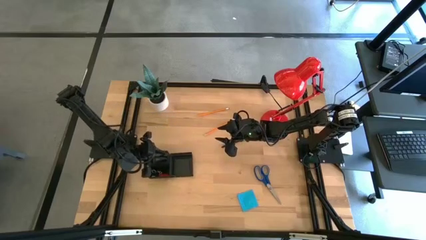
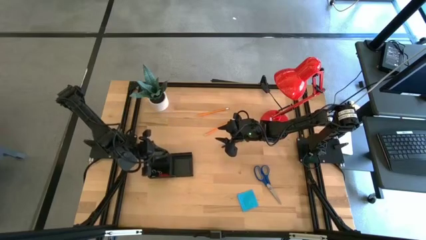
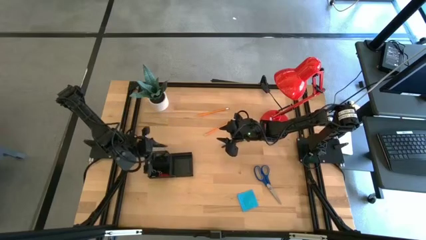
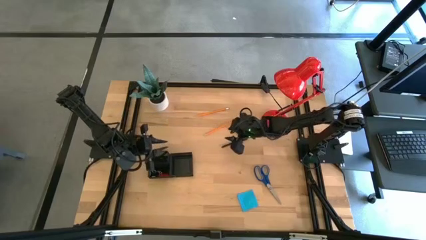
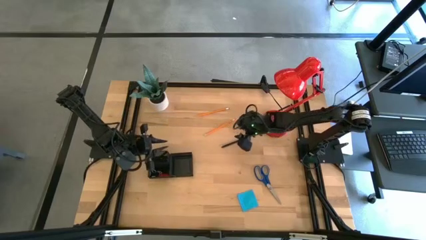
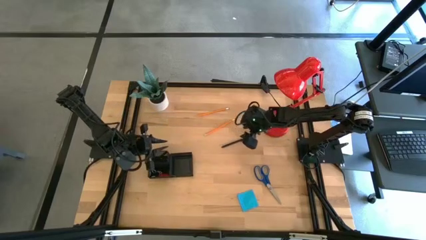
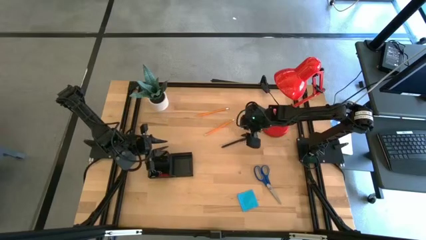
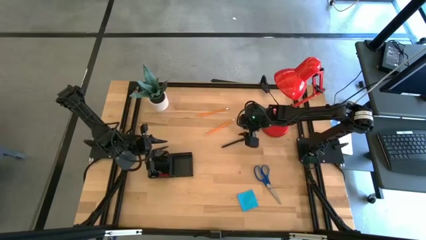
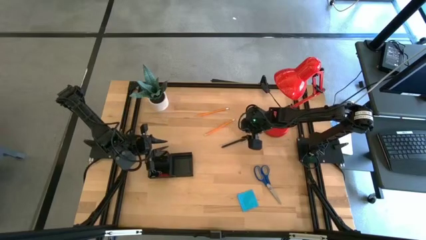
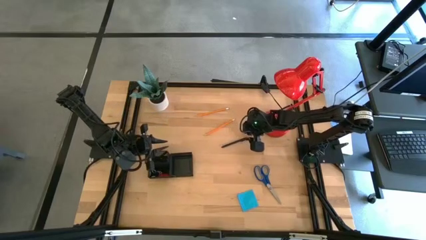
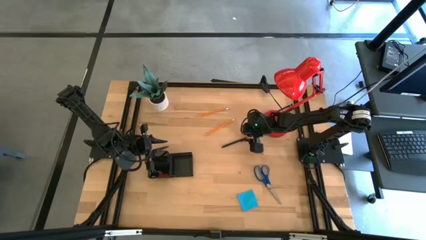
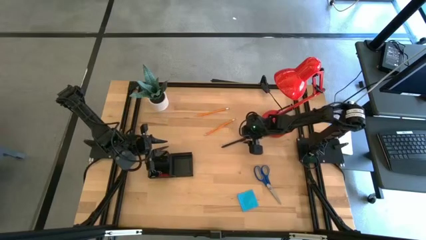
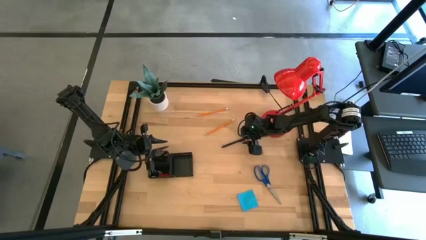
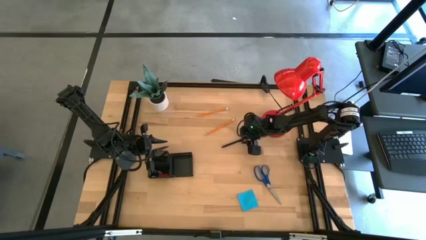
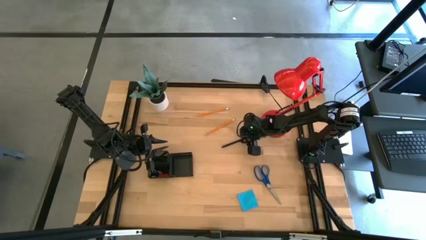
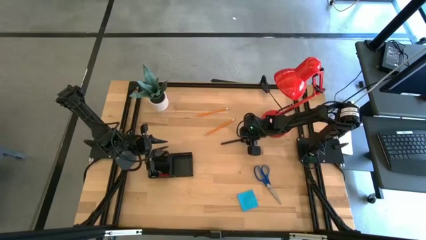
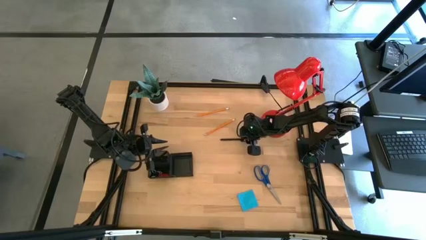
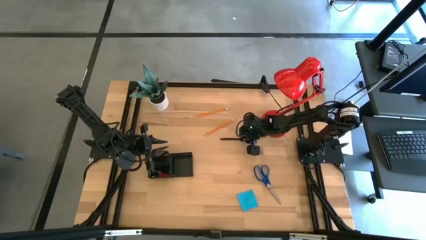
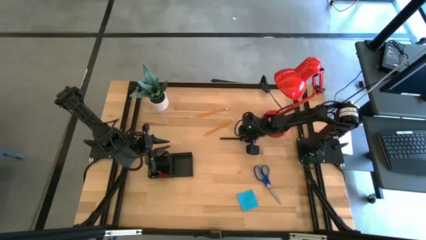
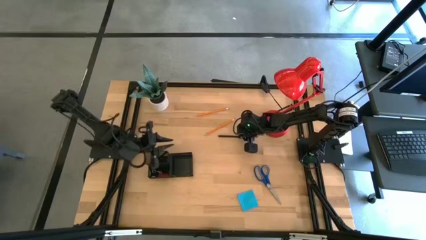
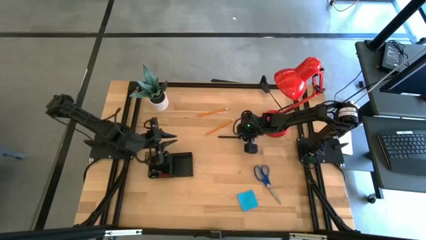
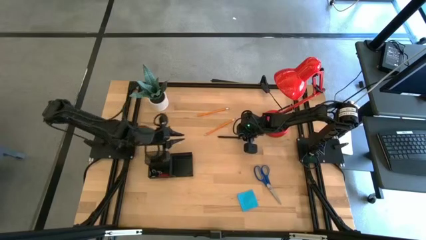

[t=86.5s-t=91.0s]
Task: Pick and place office supplies into organizer
Put the black pen into the back left compartment of the desk organizer

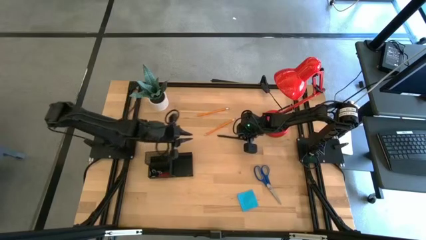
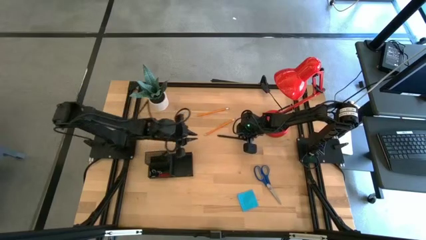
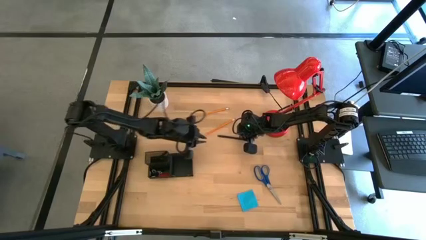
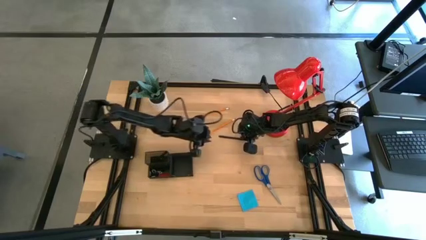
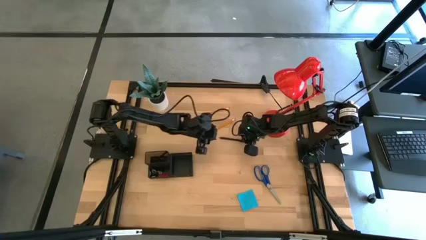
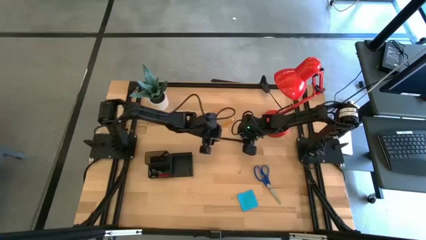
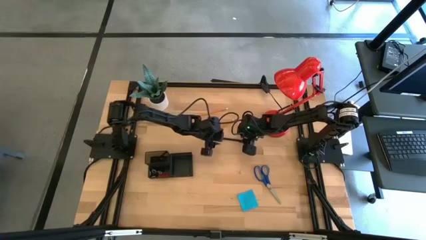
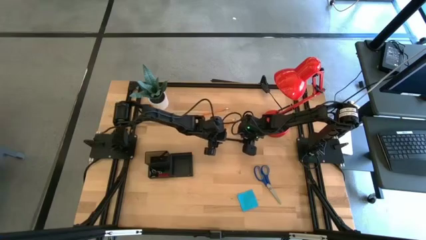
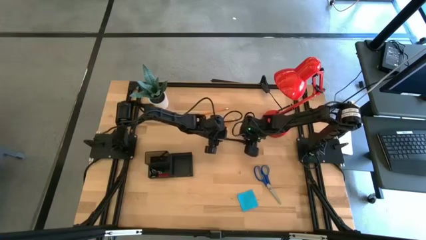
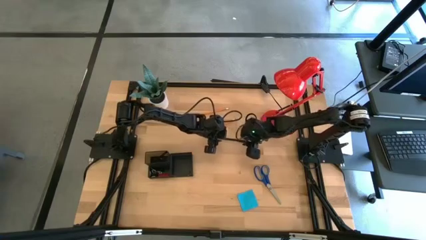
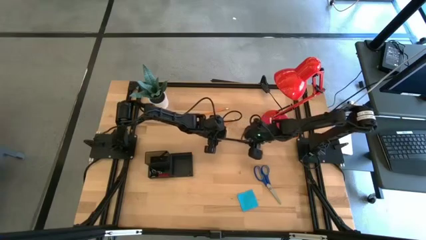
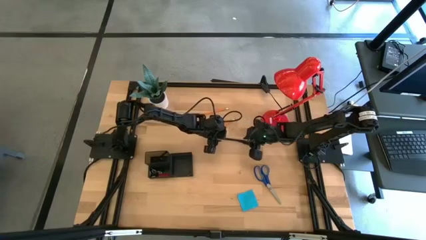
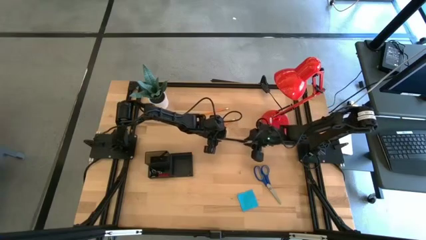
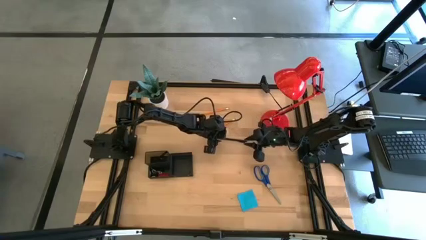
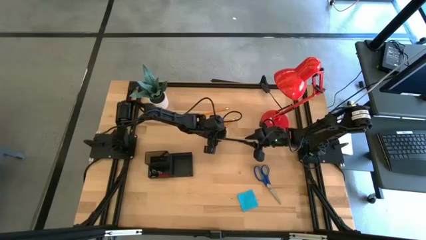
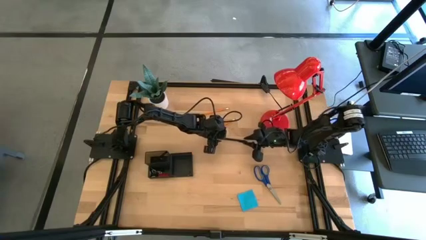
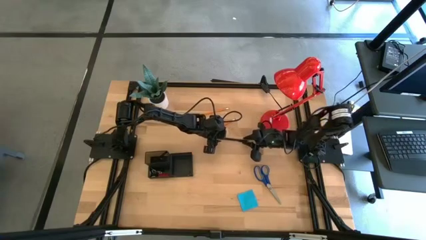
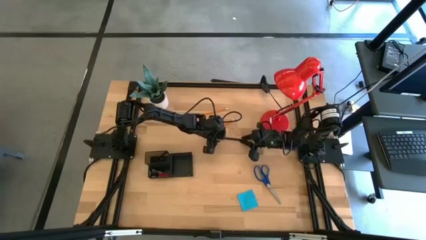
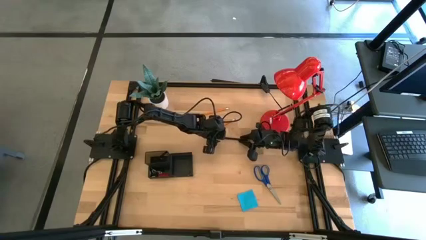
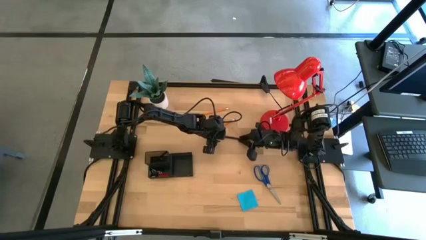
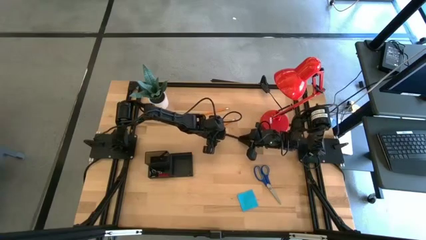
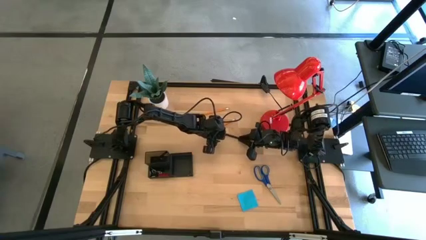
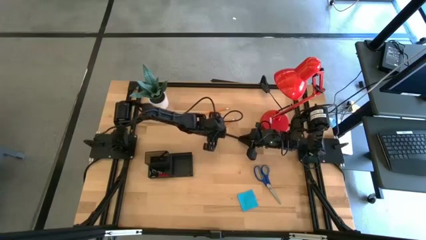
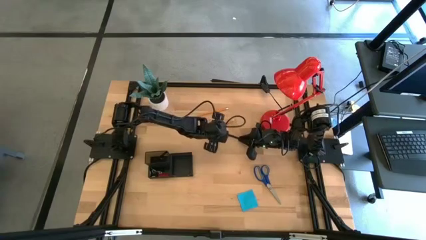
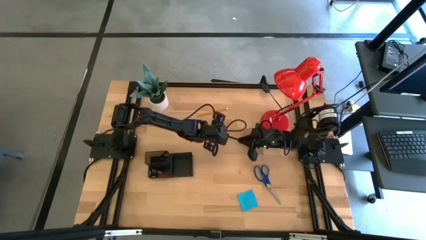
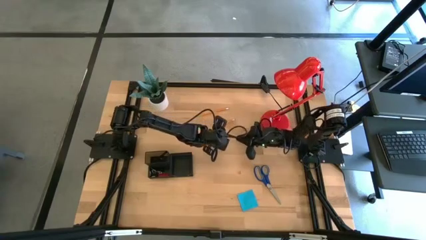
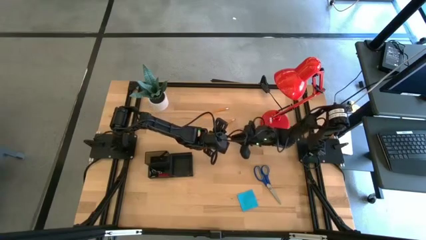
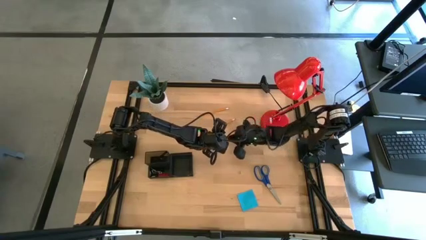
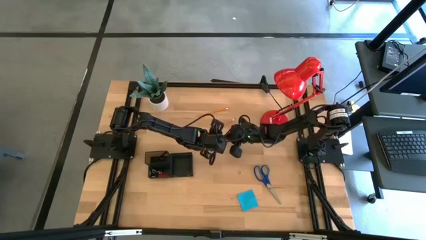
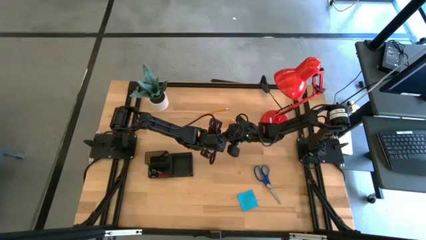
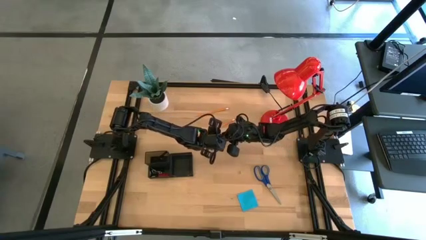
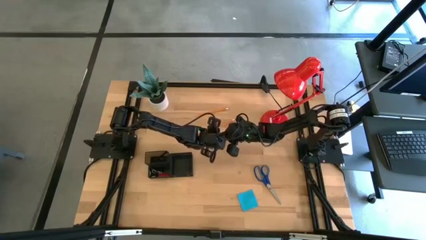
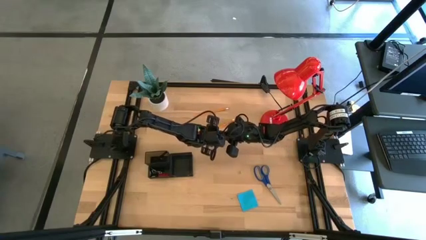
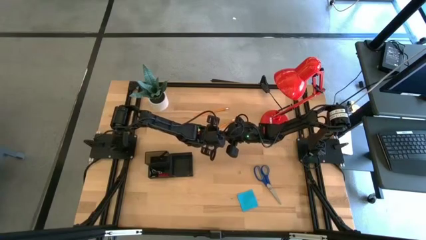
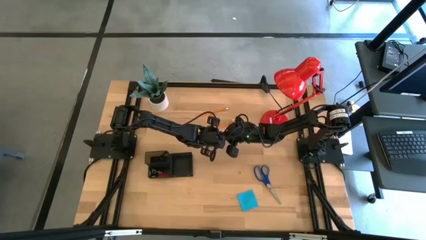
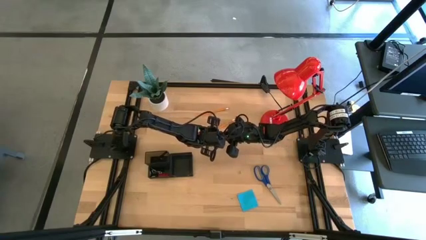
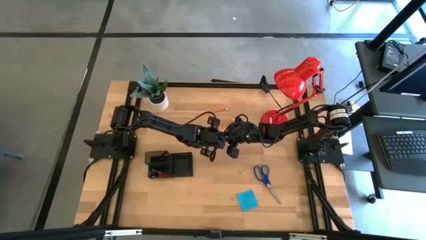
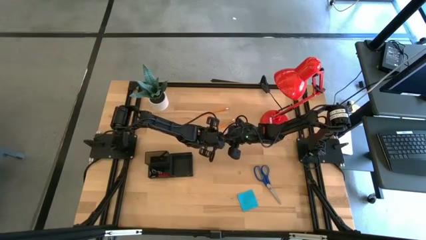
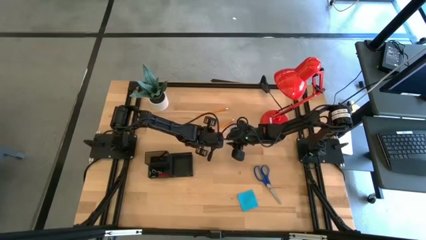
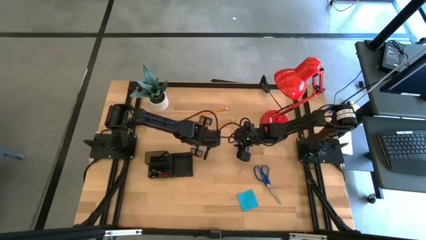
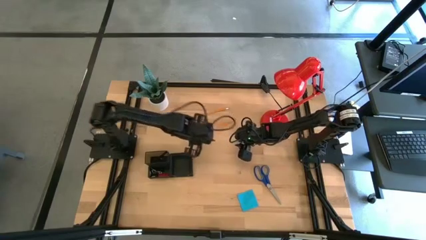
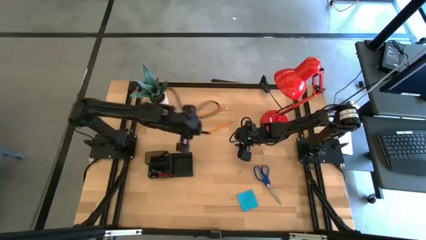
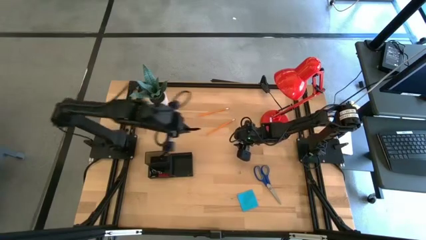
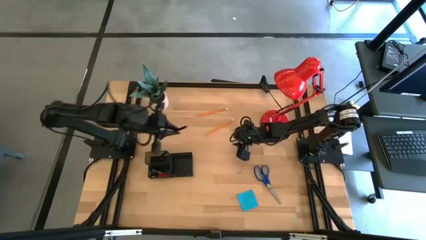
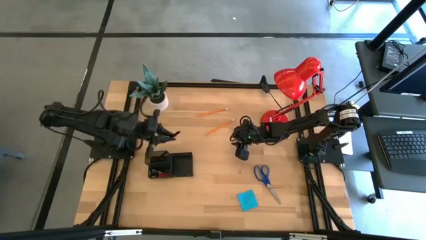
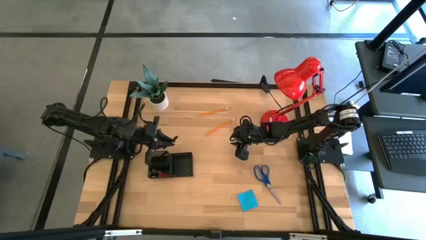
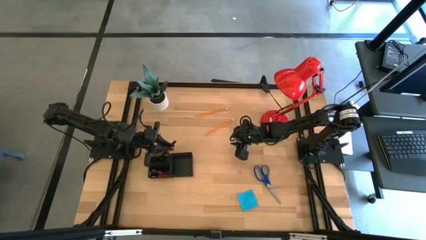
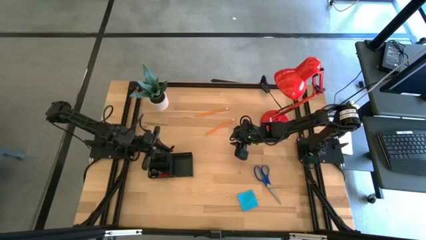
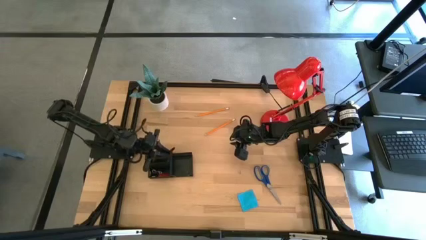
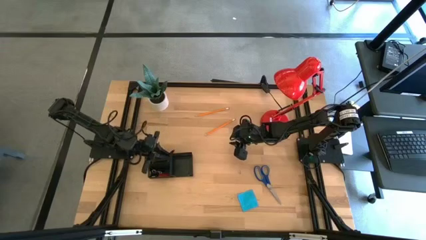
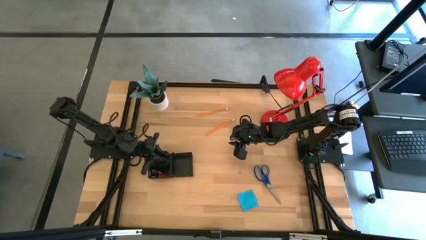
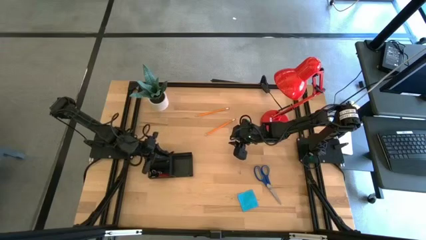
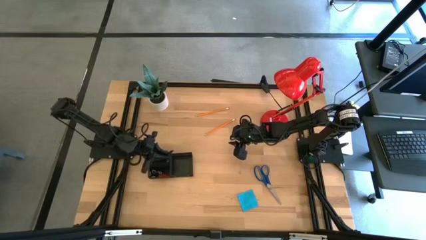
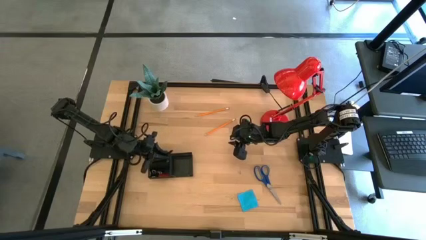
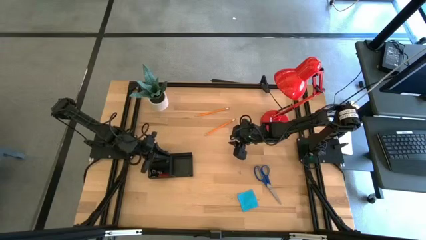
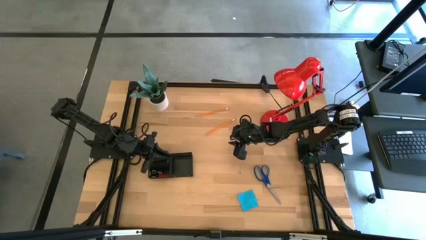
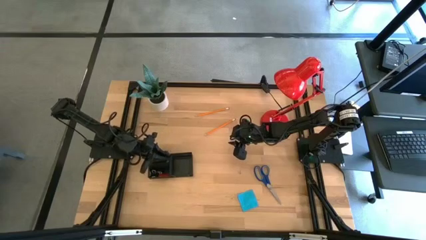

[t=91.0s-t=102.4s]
Put the black pen into the back left compartment of the desk organizer
